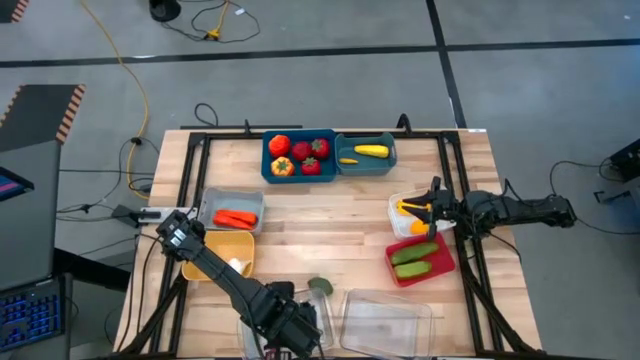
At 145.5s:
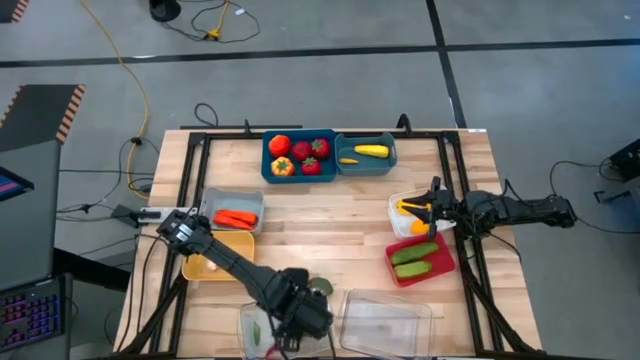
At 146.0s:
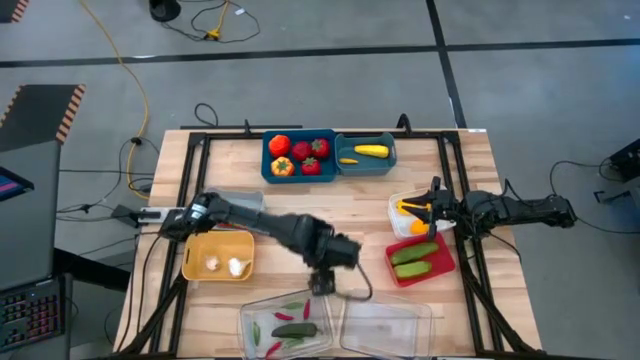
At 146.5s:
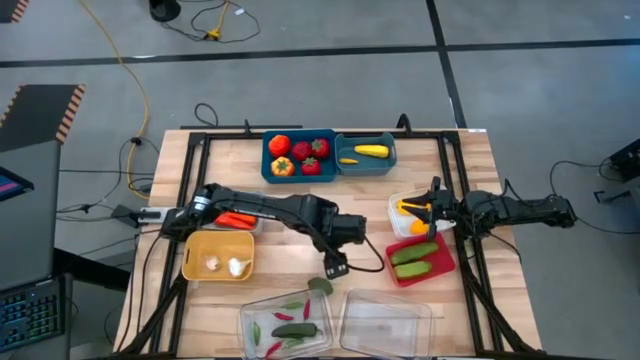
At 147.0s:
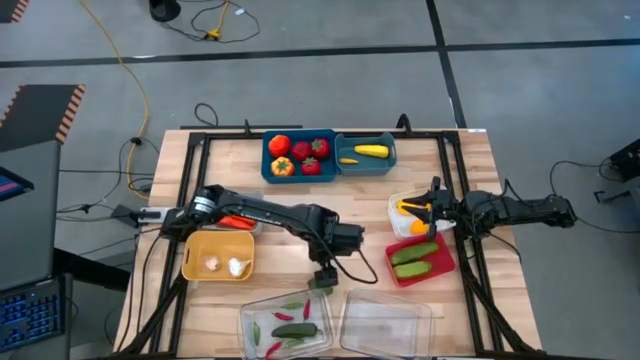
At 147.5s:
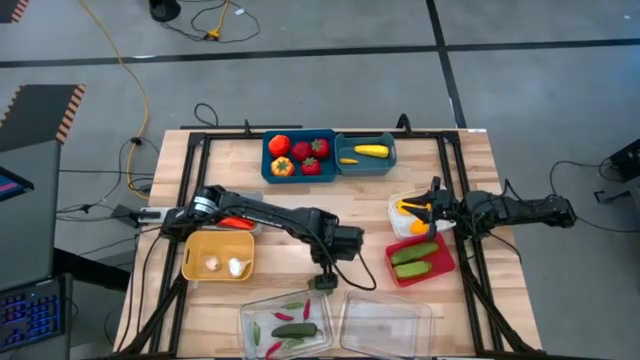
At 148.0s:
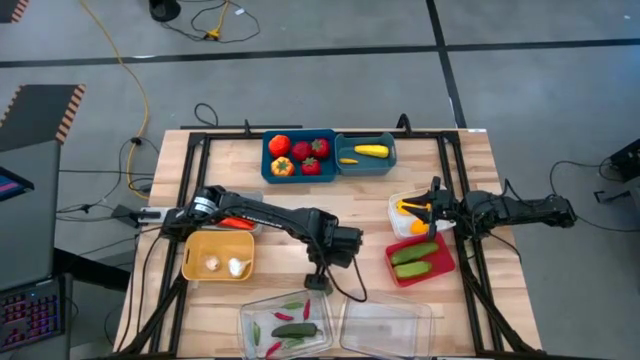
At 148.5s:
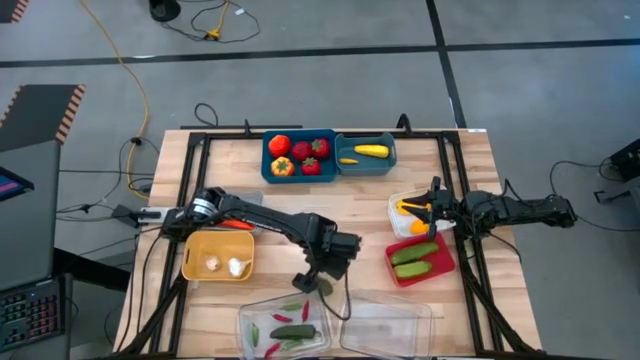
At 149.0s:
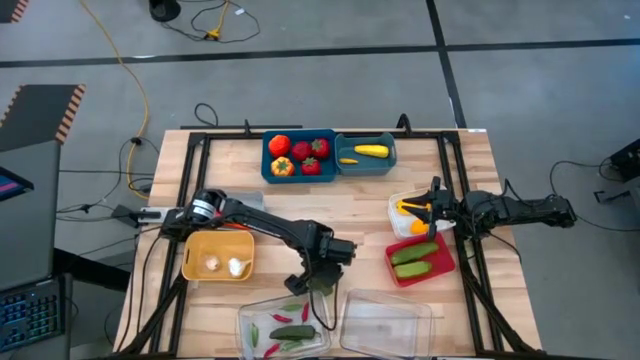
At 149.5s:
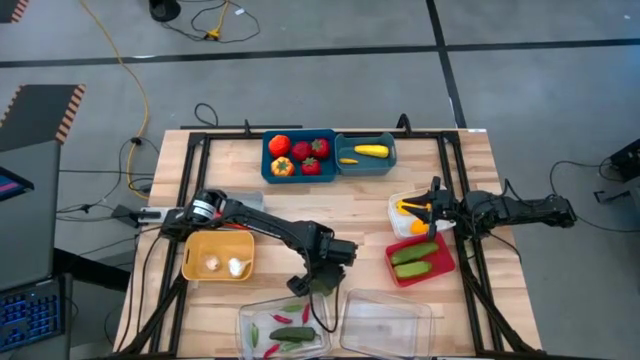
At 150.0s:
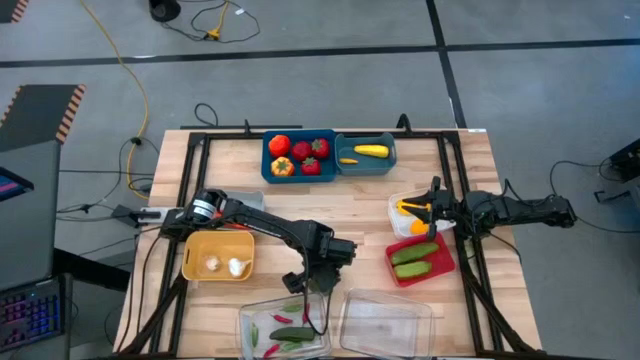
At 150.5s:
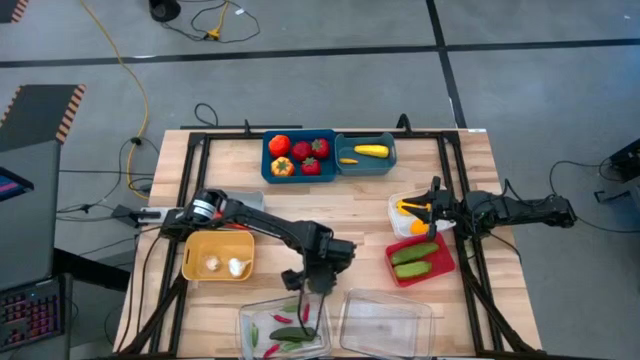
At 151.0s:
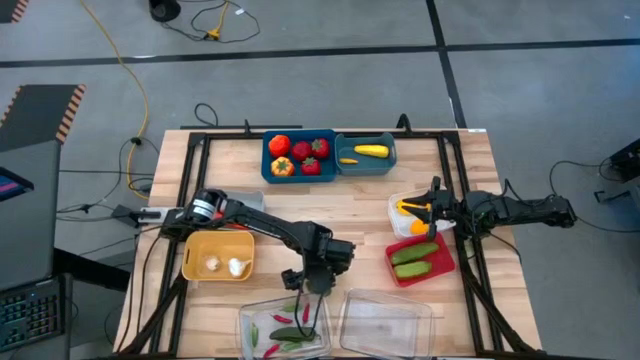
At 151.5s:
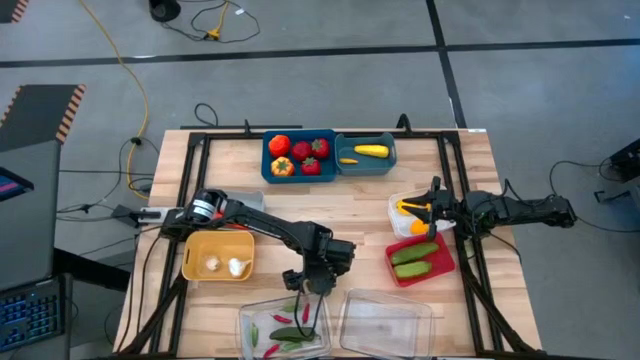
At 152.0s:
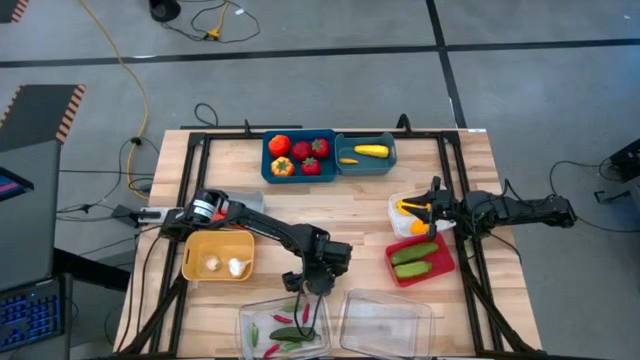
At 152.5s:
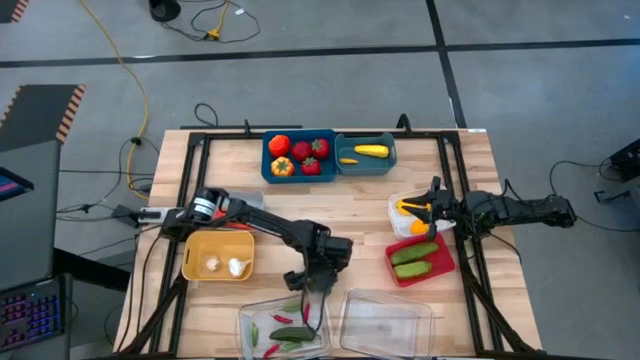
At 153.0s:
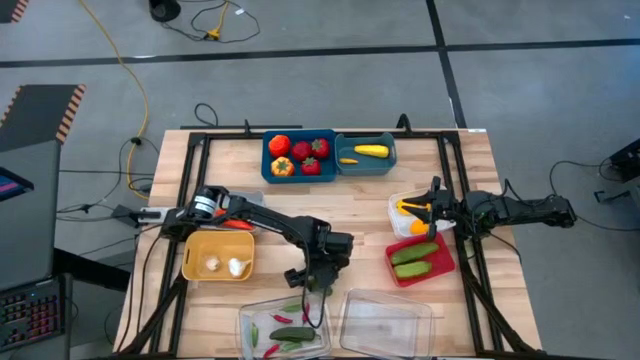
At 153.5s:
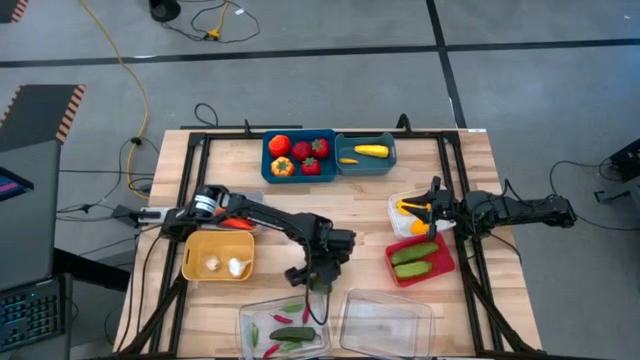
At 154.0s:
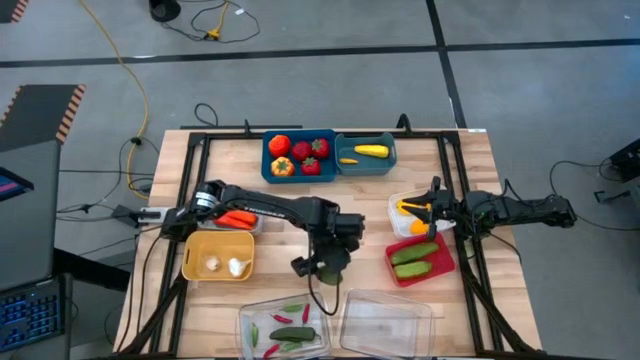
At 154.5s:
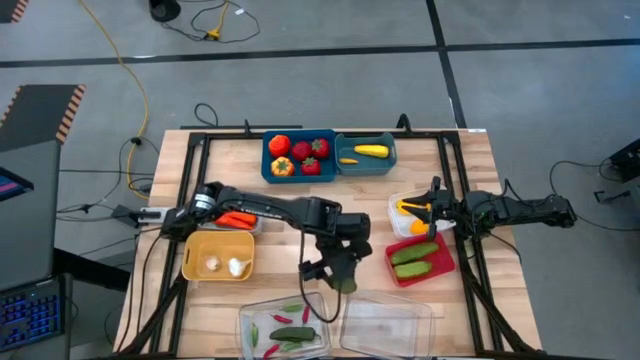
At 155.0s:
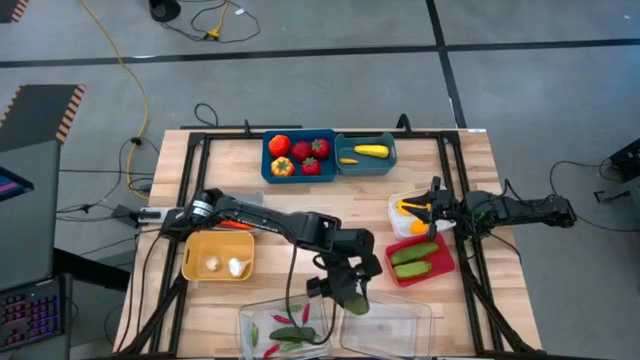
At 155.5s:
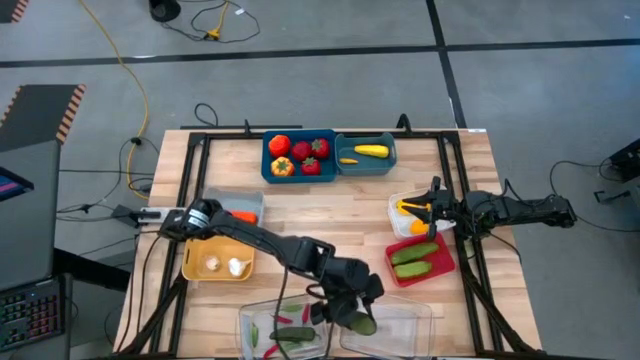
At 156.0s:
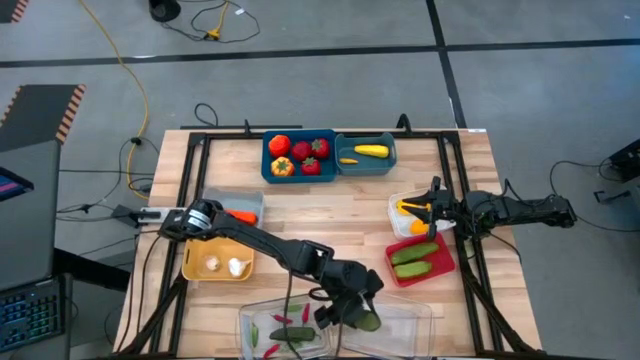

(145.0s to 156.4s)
Task: Sort produce into baskets
Put the green lemon into the right transparent bin

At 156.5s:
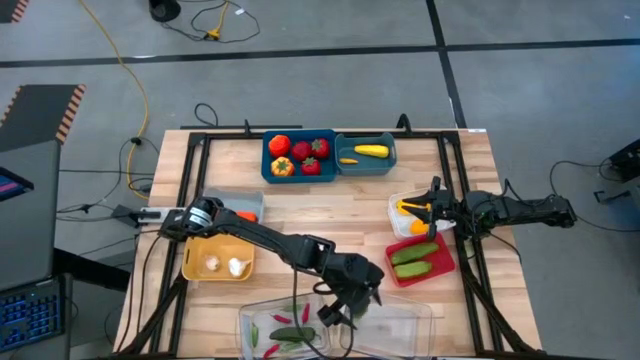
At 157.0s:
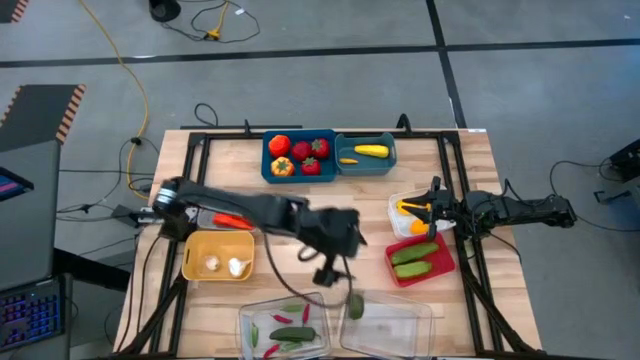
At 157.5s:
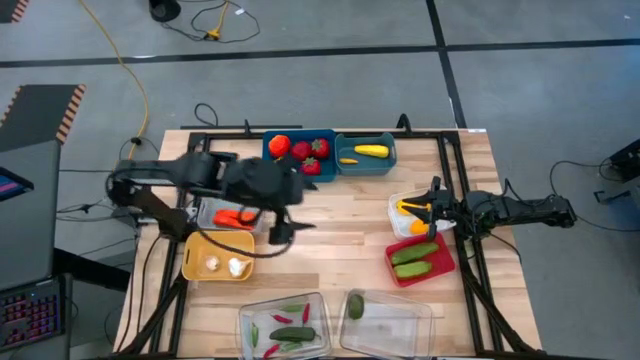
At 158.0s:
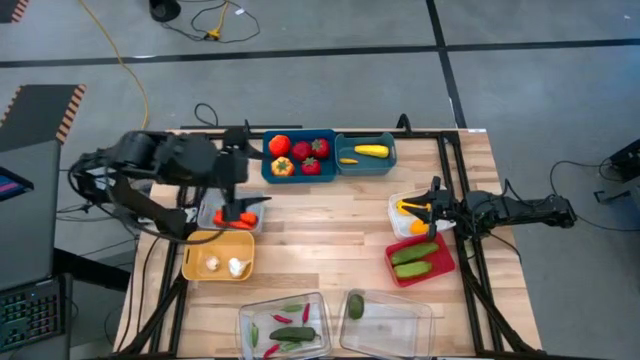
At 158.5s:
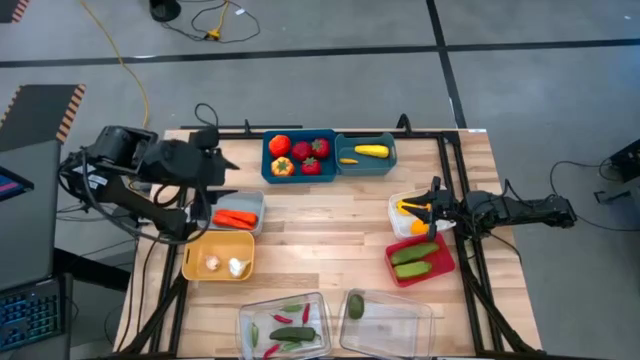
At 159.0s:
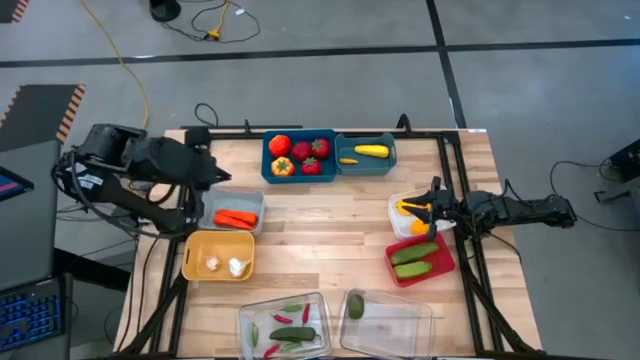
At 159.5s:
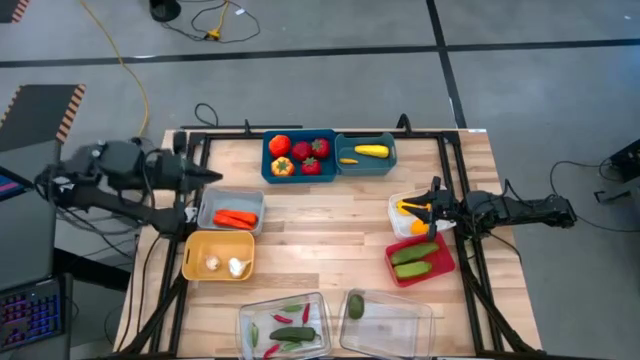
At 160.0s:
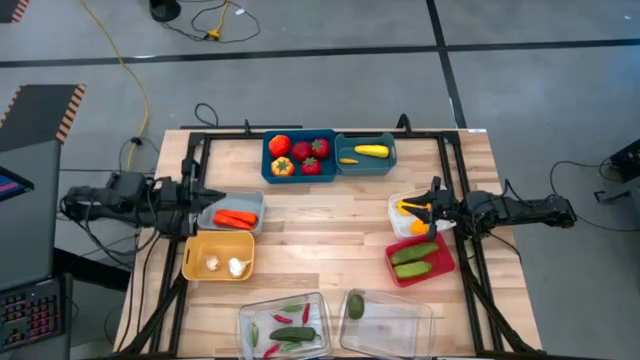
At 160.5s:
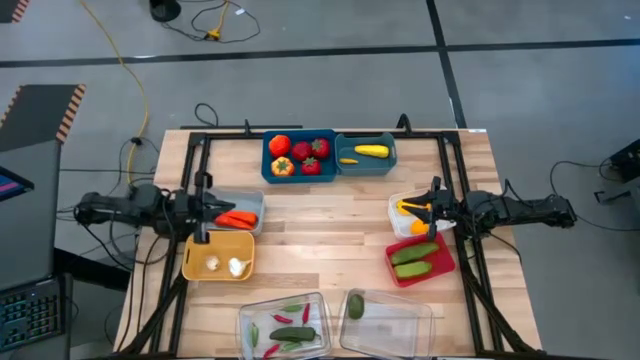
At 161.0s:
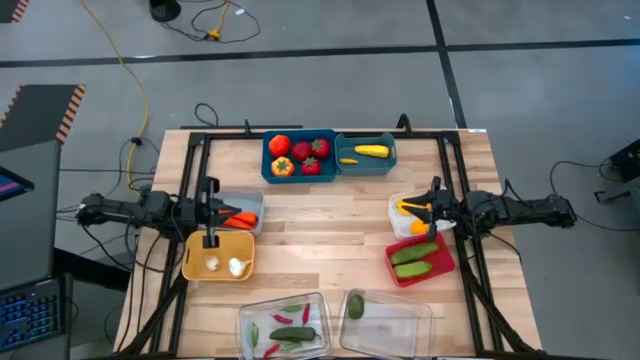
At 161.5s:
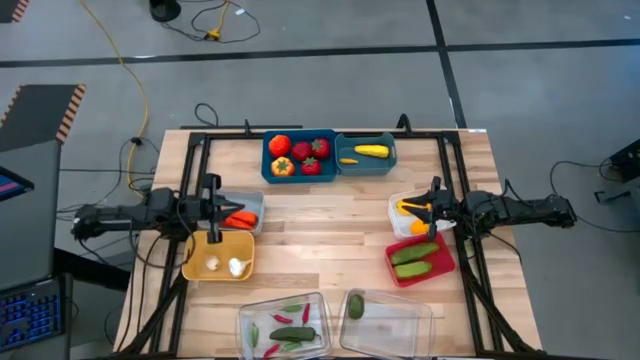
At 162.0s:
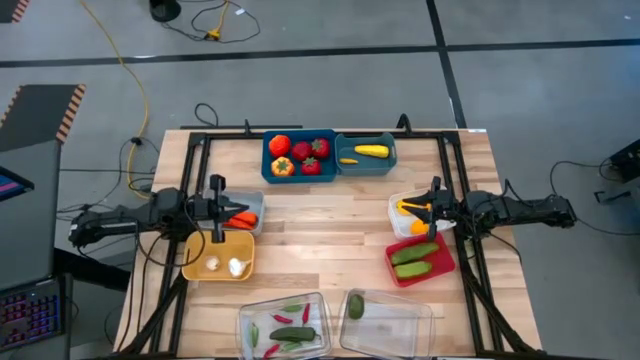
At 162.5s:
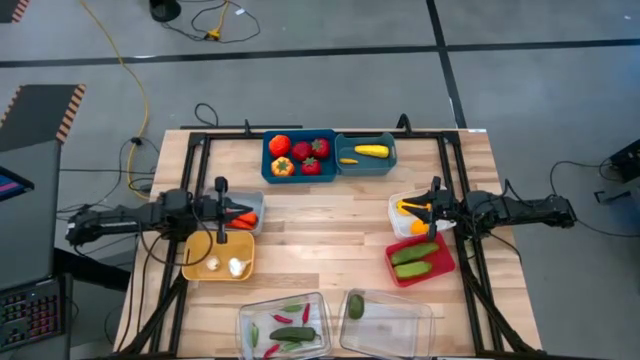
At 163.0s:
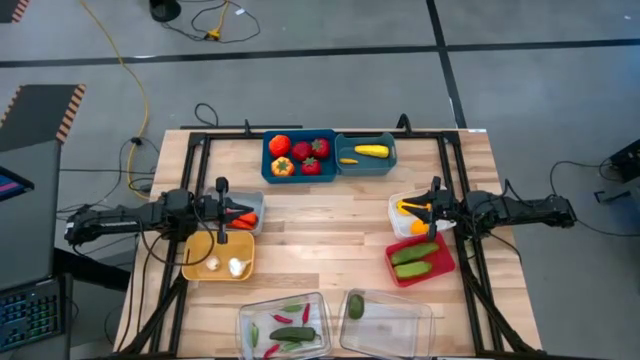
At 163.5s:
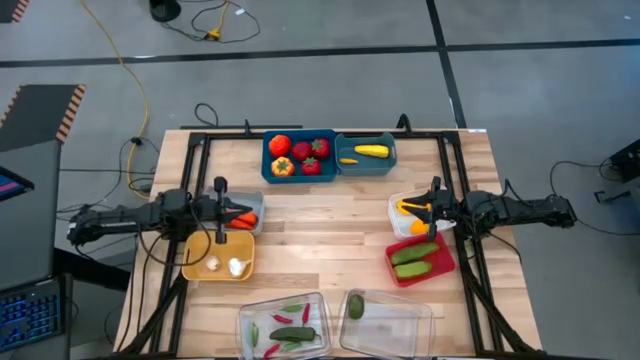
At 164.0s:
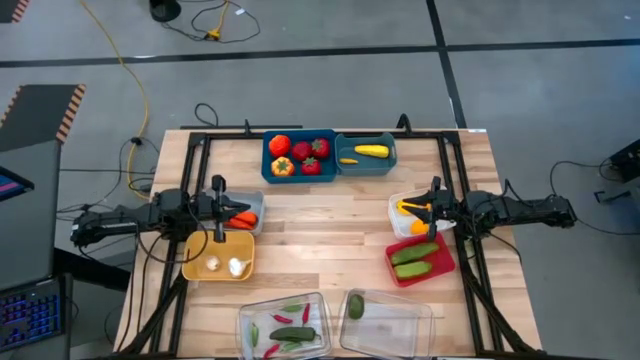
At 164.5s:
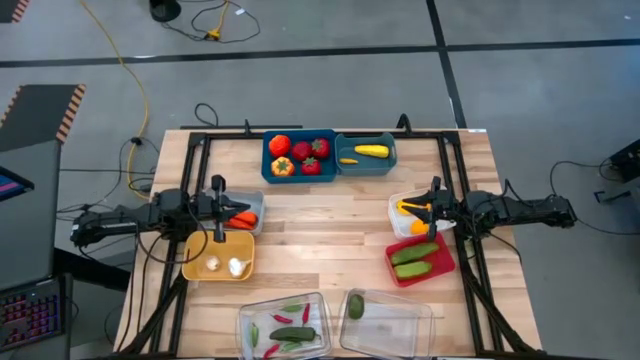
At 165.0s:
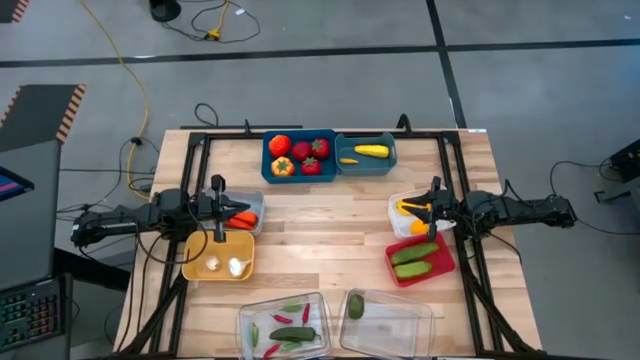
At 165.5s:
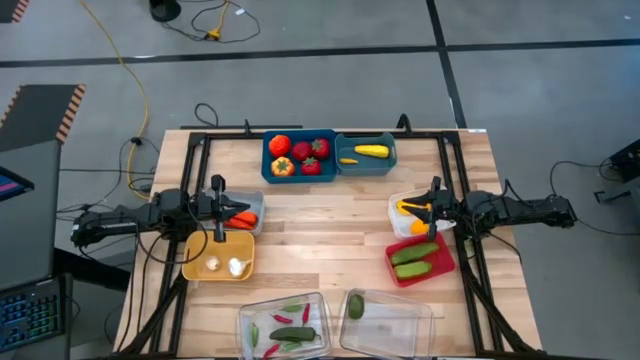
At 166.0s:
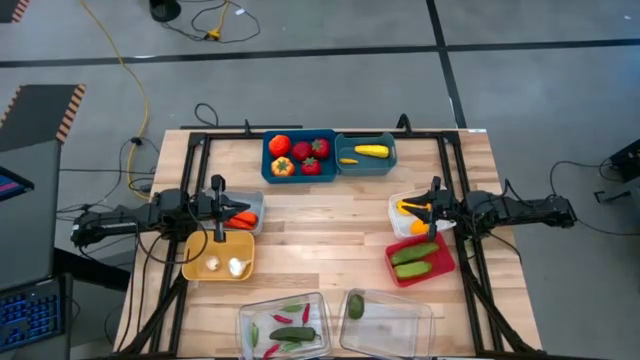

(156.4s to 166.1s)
Return to Home Position
